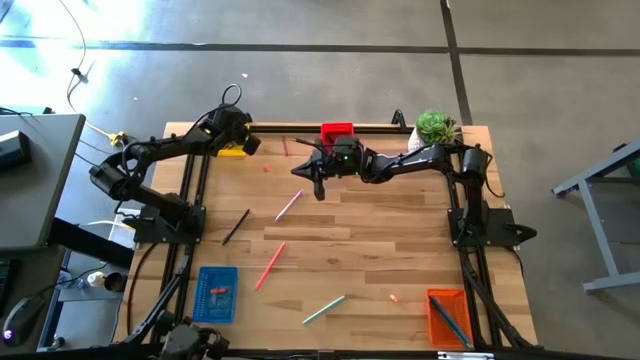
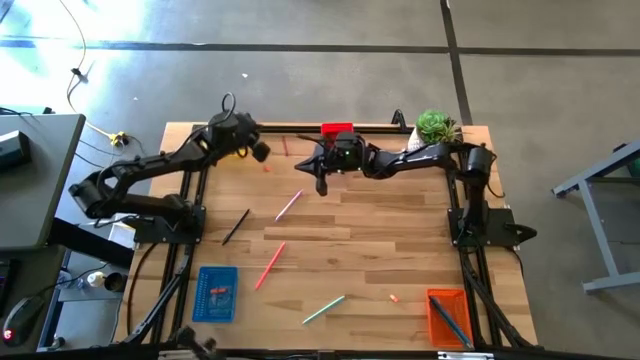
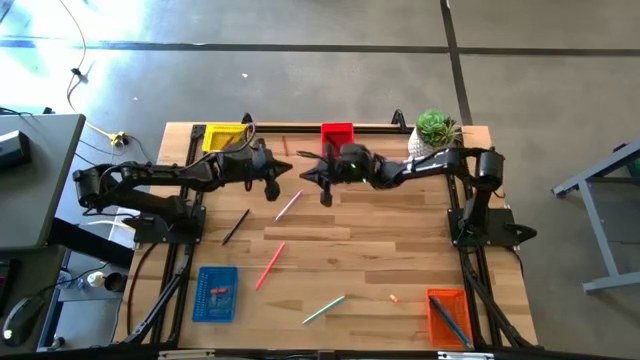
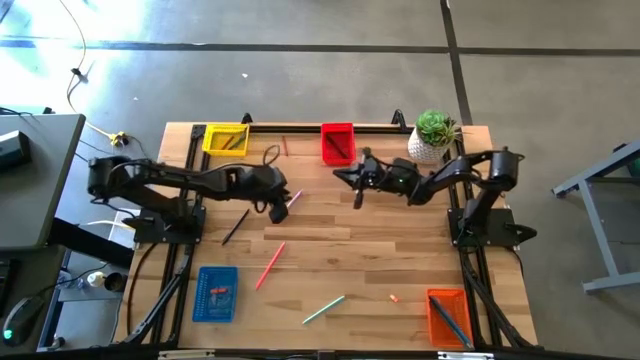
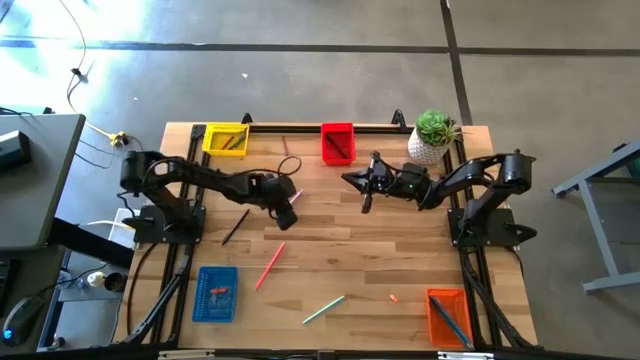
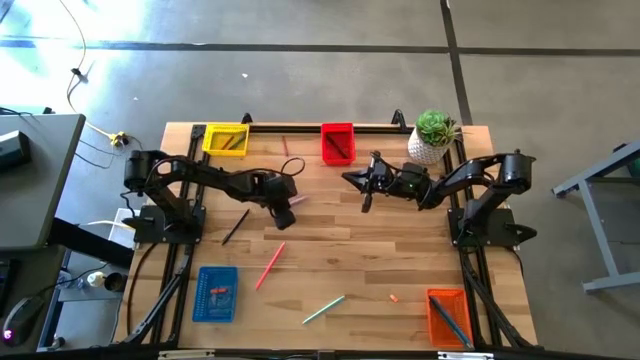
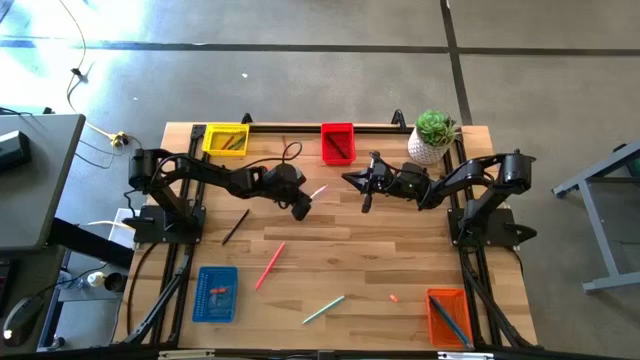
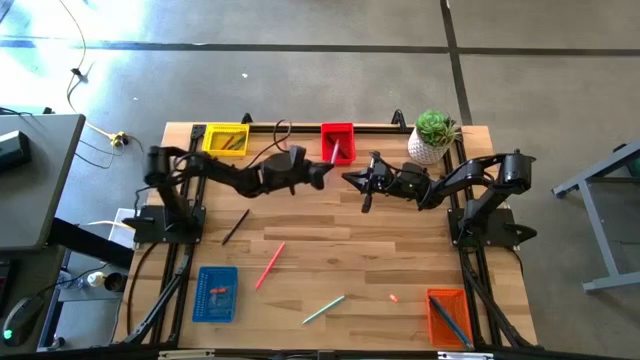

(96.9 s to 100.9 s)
Task: Sort crayons/erasers/pens/pencils in bins
Put the purple pen into the red bin

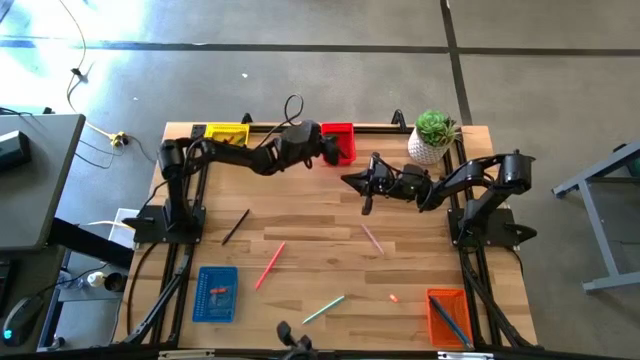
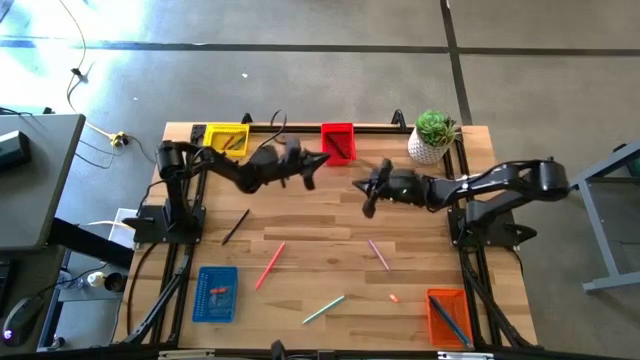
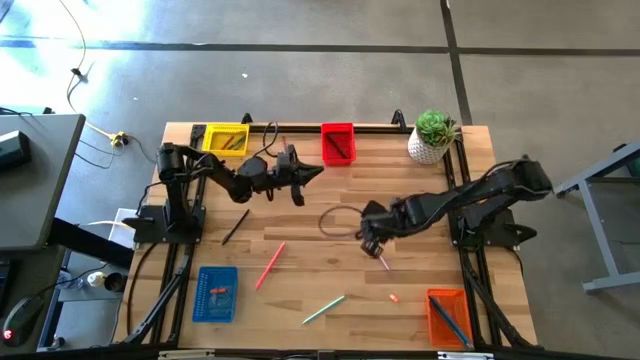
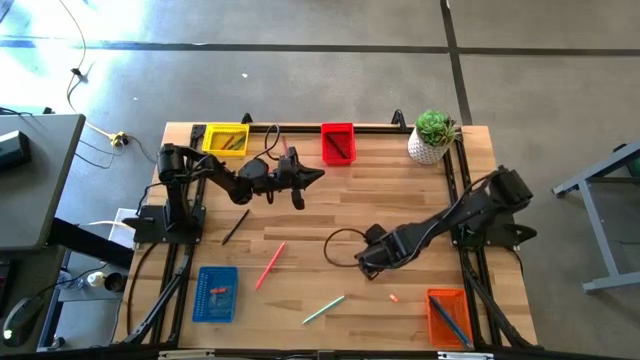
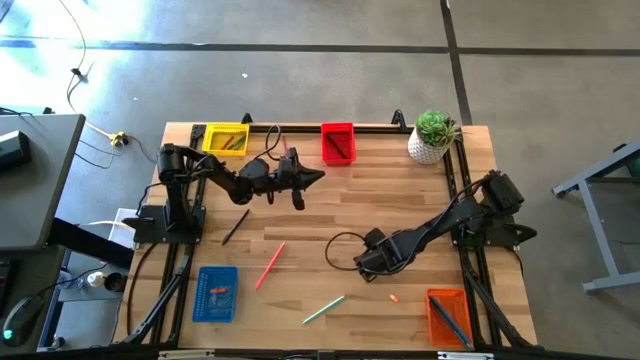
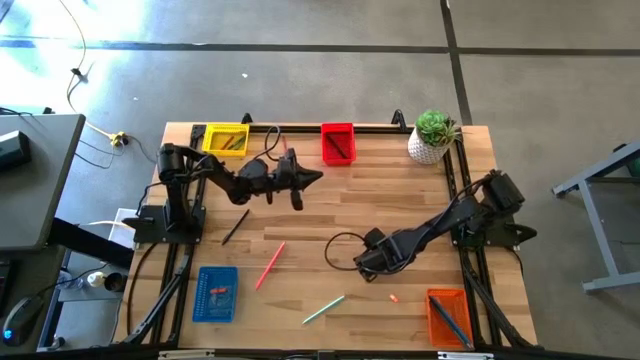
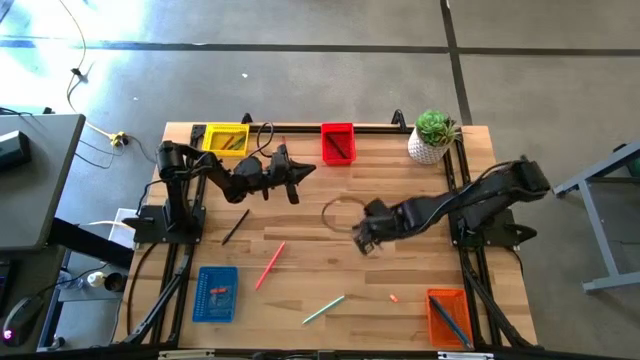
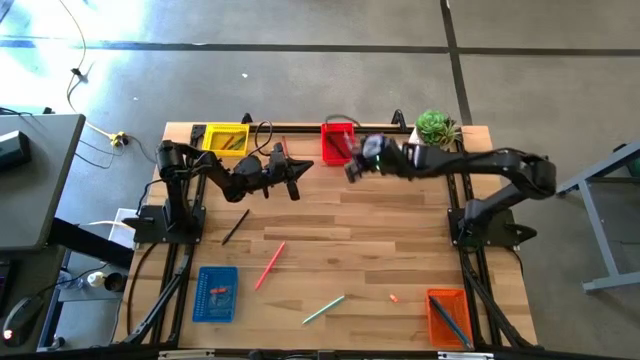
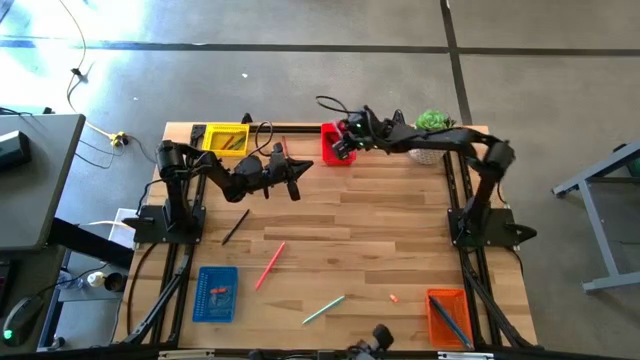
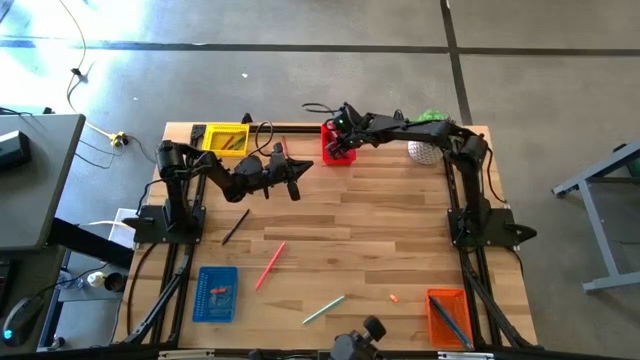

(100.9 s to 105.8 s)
Put the purple pen into the red bin

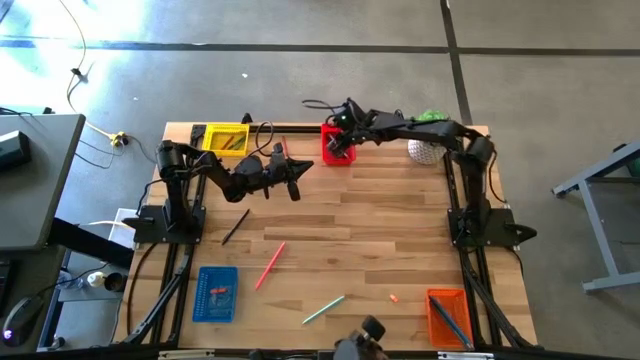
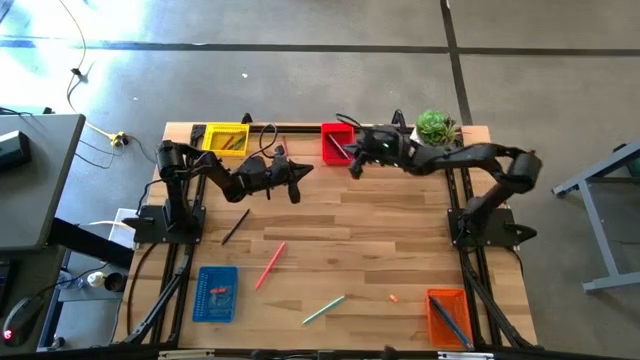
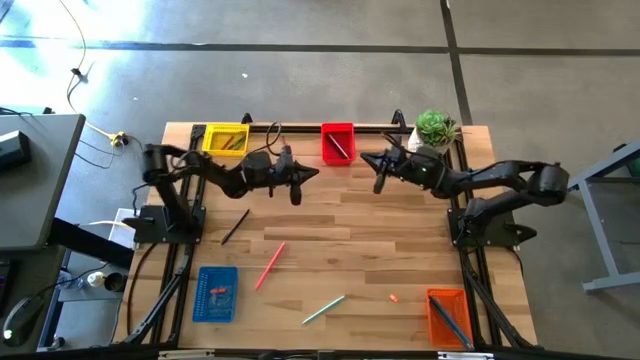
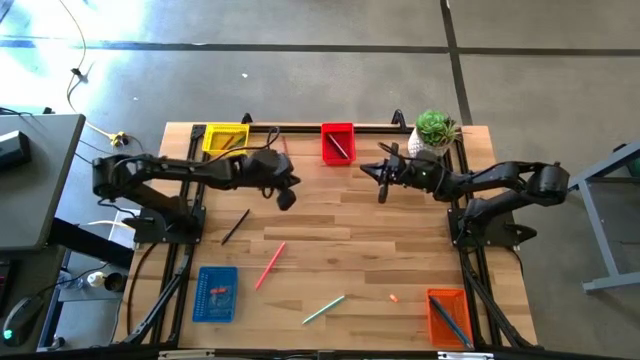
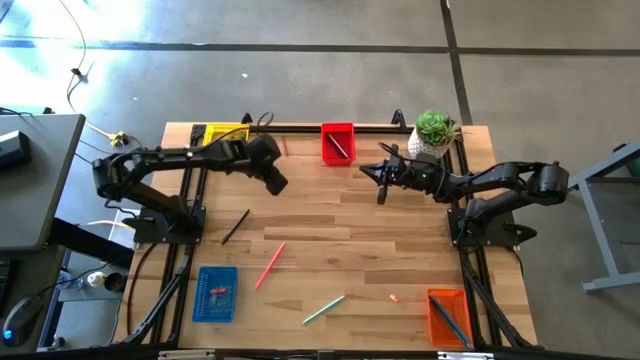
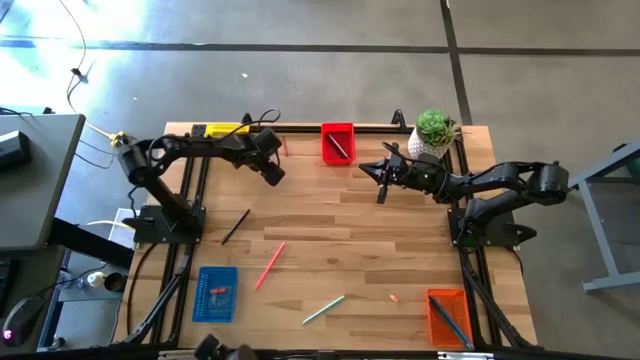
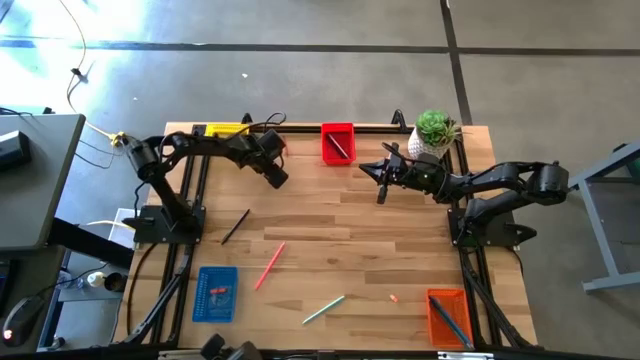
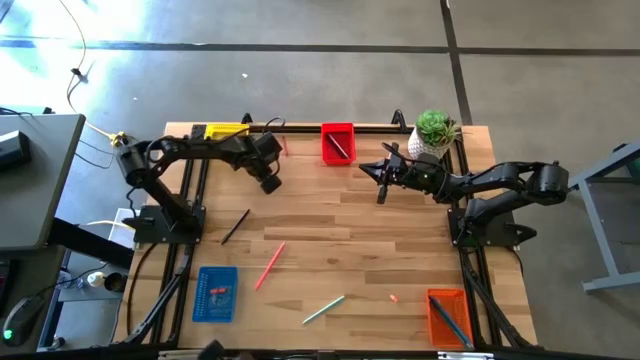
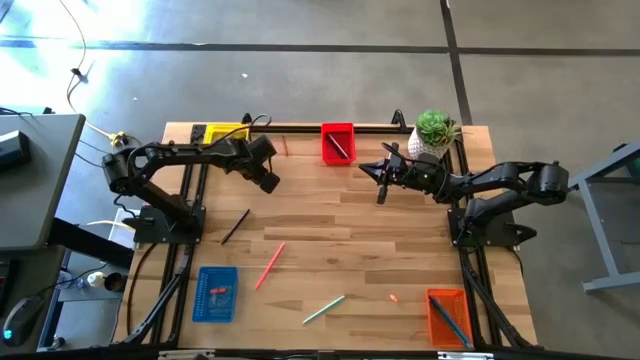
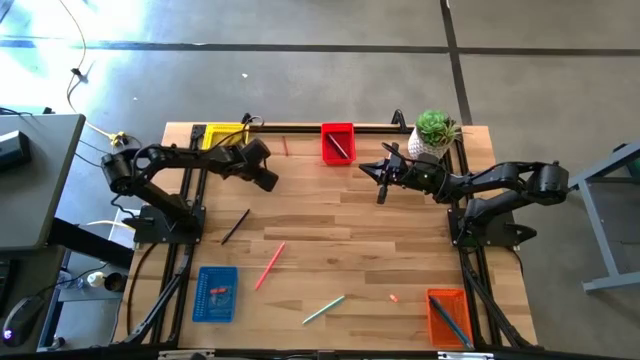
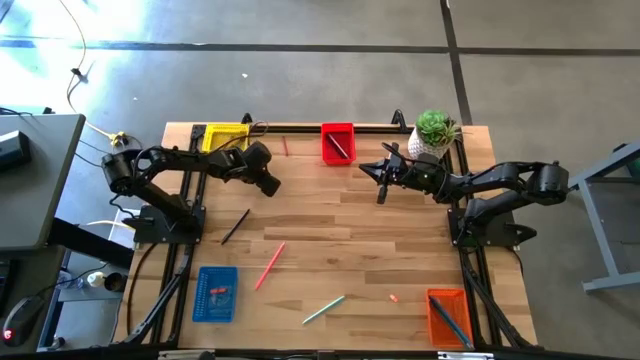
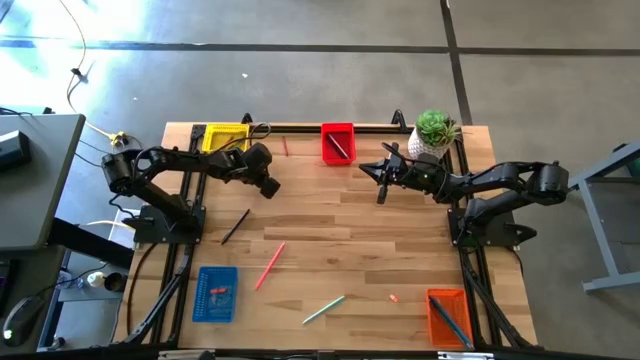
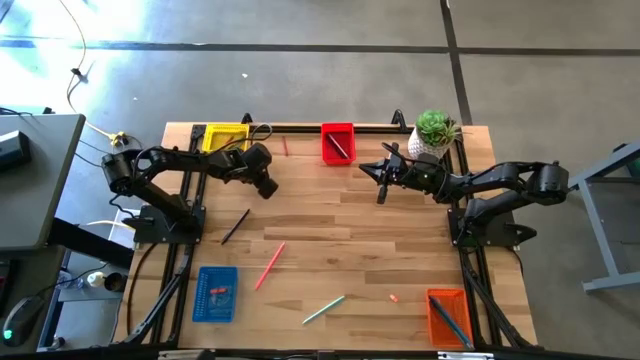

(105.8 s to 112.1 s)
Put the top orange eraser into the blue bin

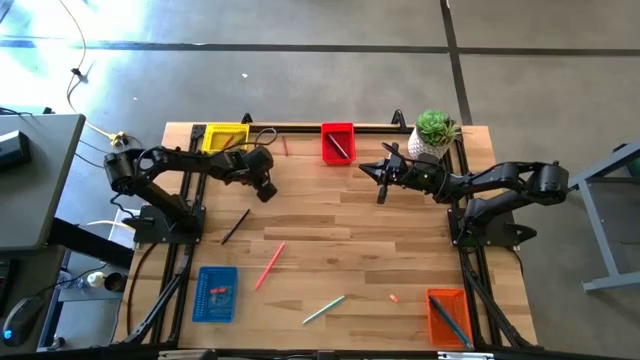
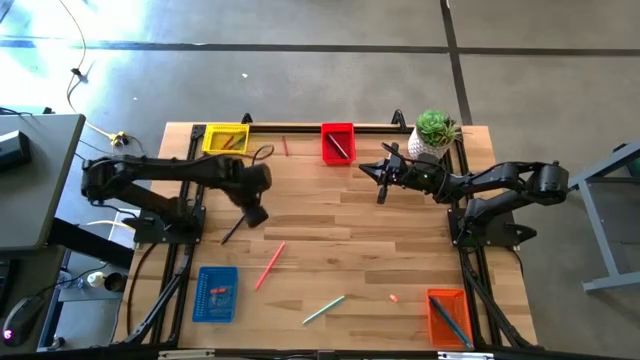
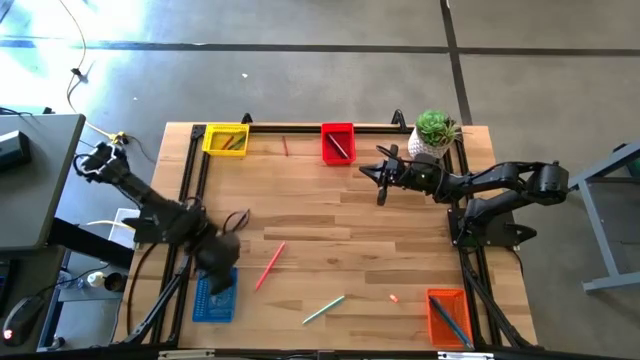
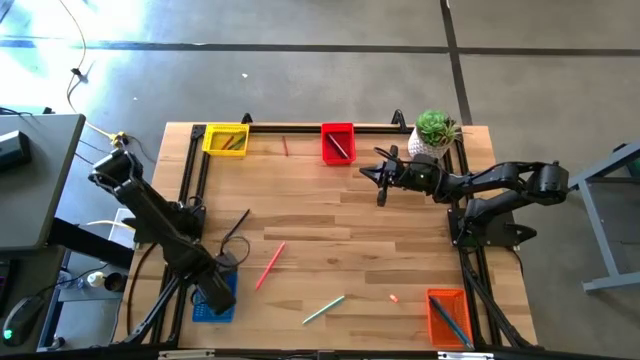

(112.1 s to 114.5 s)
Put the top orange eraser into the blue bin

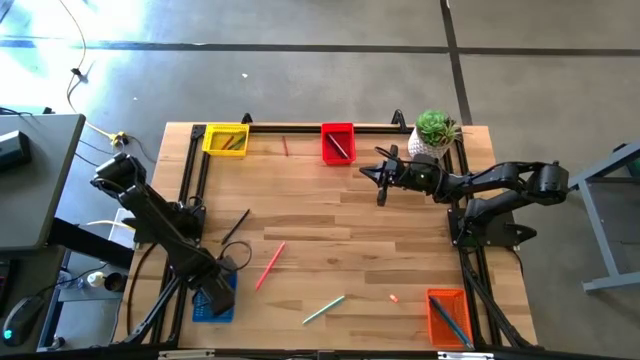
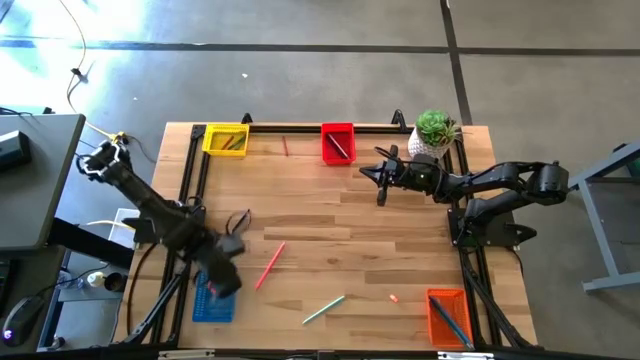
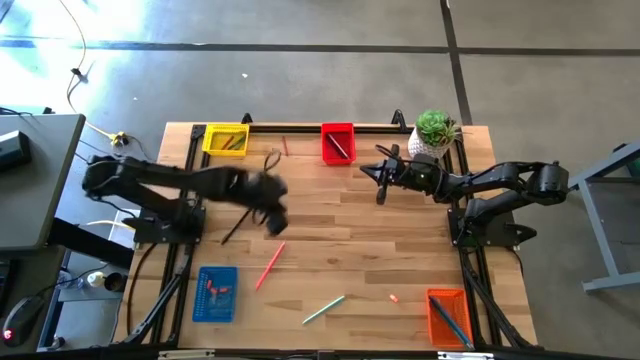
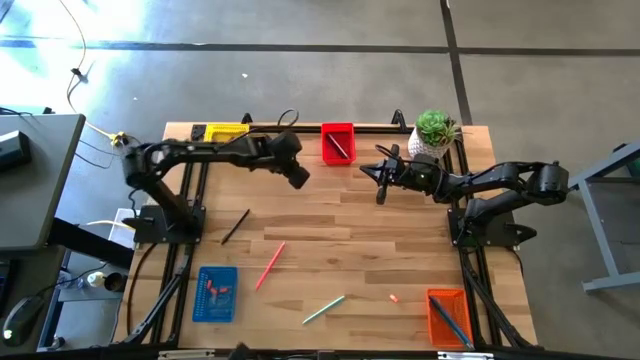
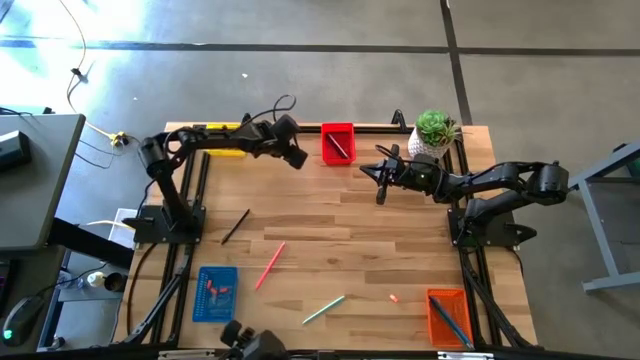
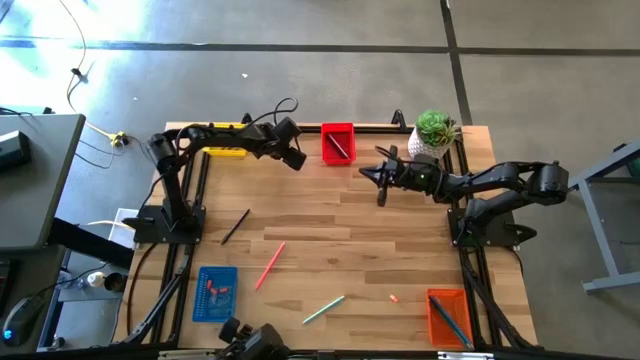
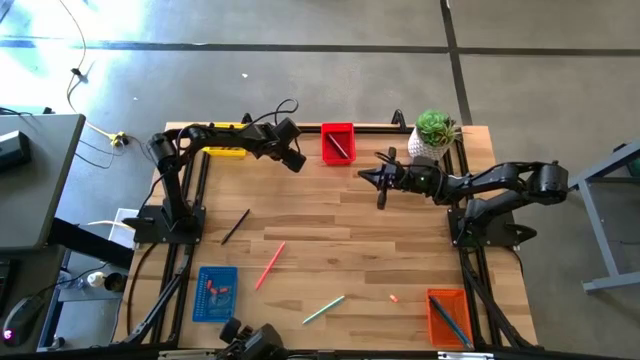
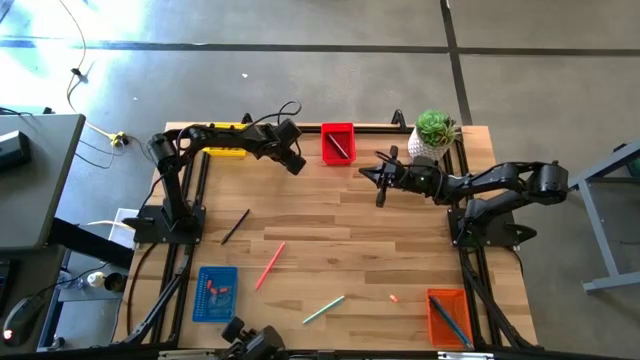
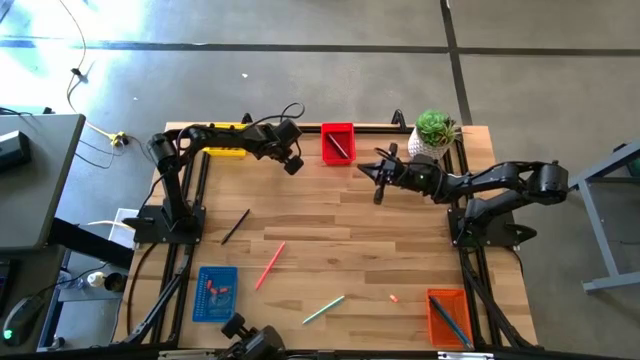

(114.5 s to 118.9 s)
Put the red crayon into the yellow bin
